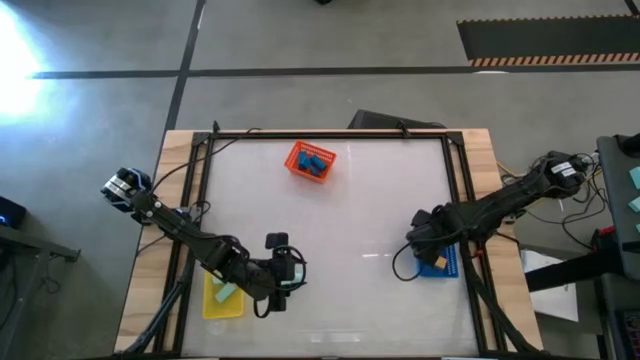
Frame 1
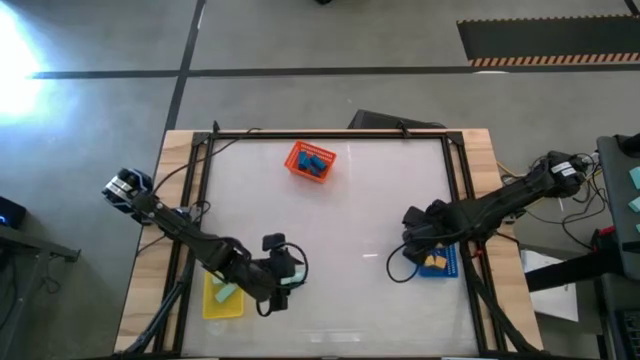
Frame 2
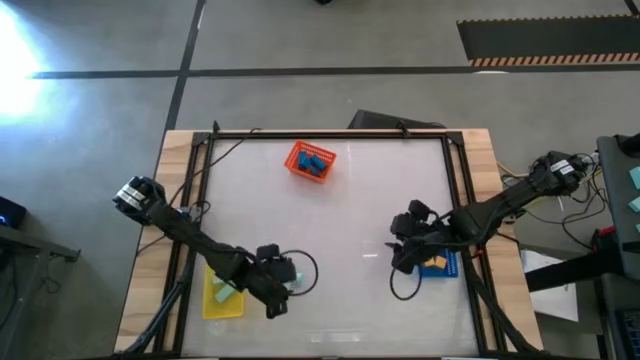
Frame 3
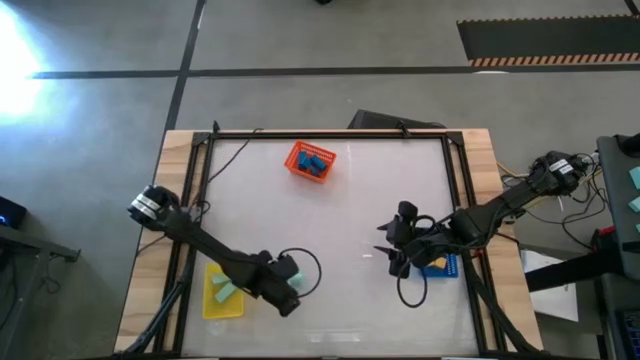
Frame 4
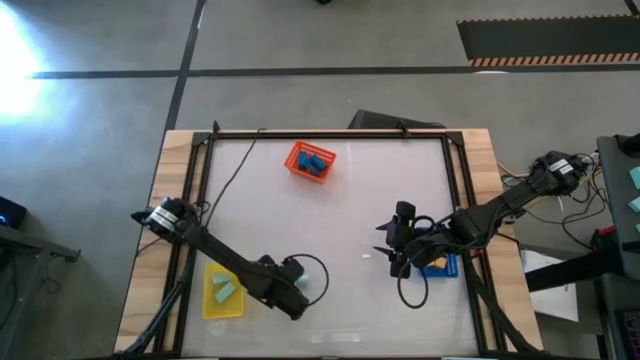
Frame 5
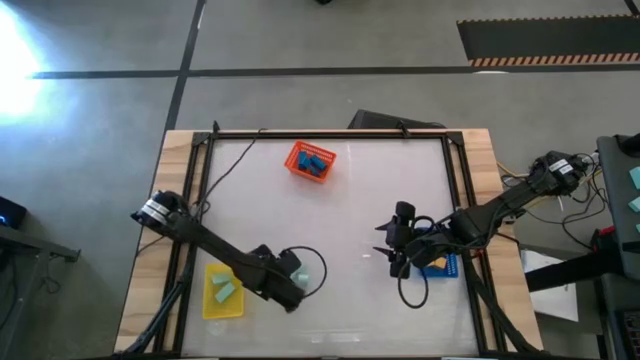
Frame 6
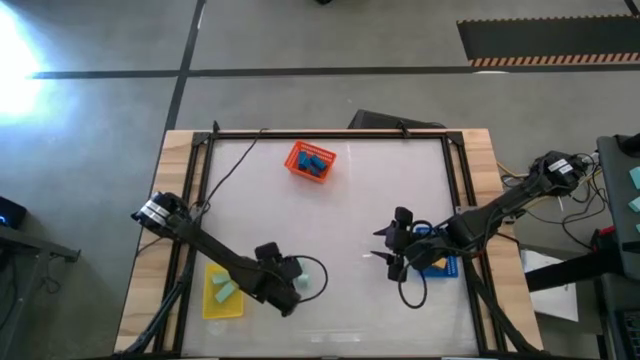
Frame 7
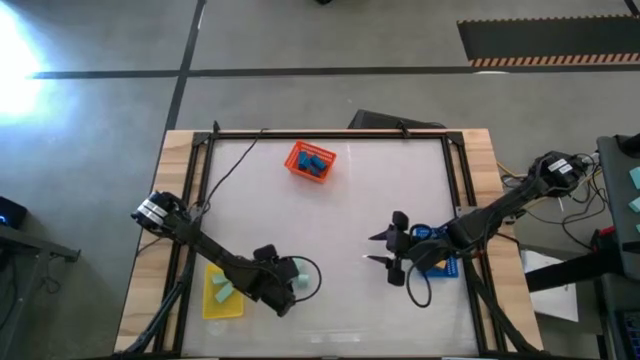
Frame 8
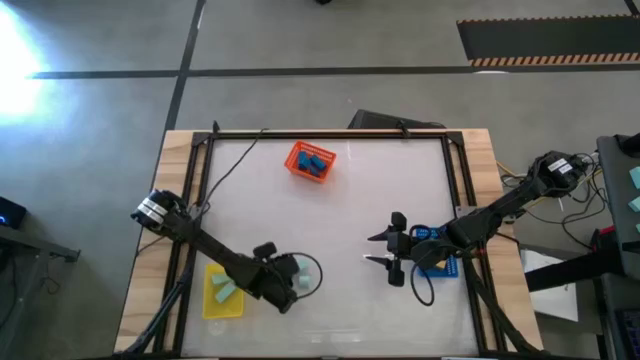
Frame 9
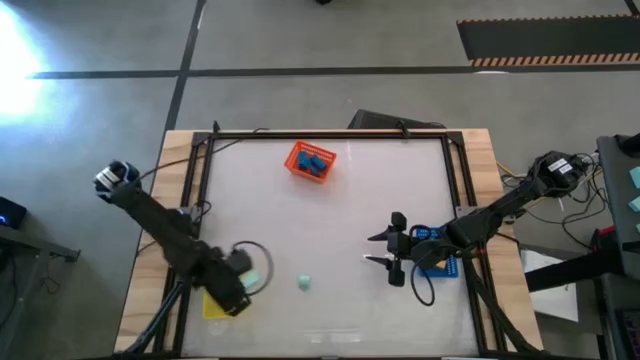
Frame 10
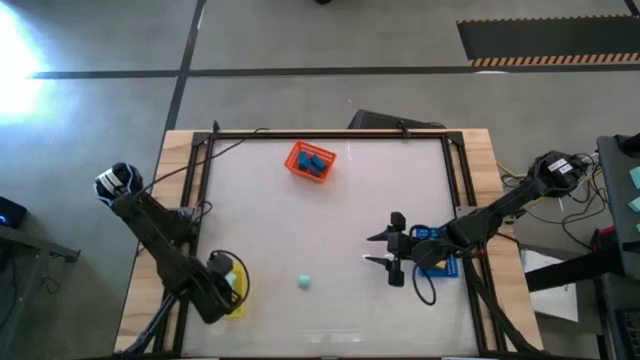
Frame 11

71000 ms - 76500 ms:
Task: Sort & place blocks by color
Put the green block into the yellow bin

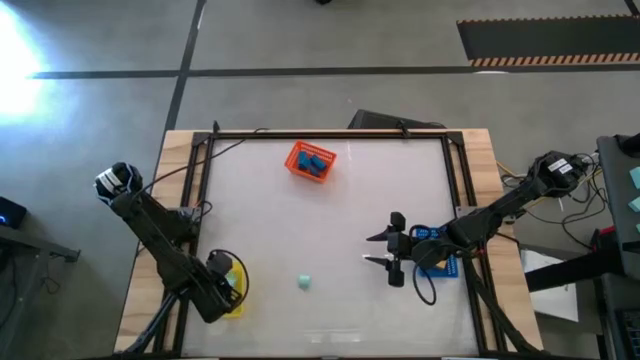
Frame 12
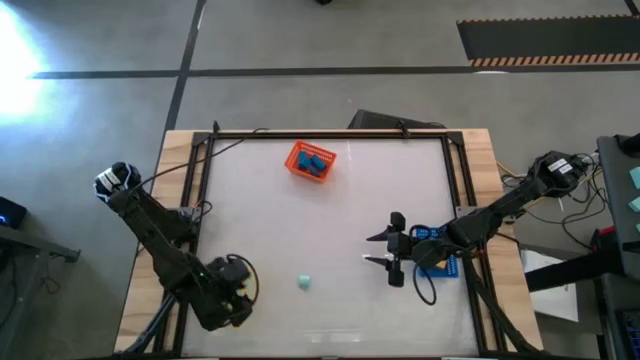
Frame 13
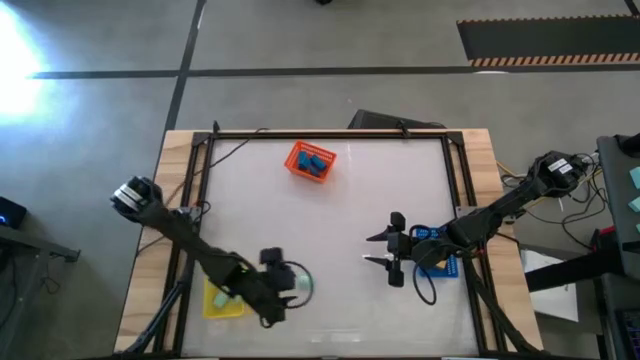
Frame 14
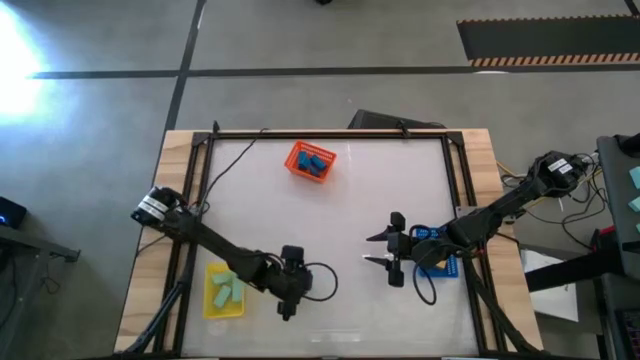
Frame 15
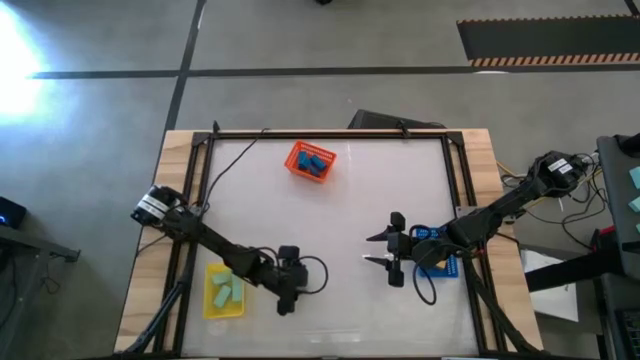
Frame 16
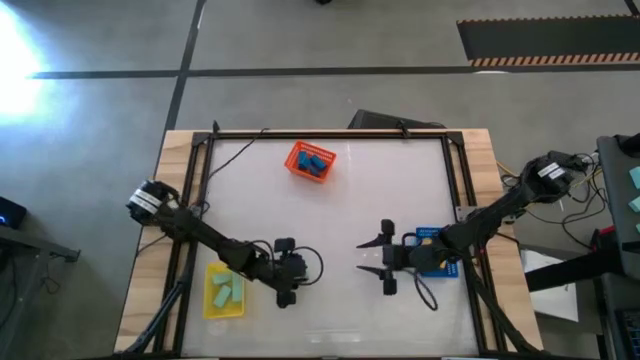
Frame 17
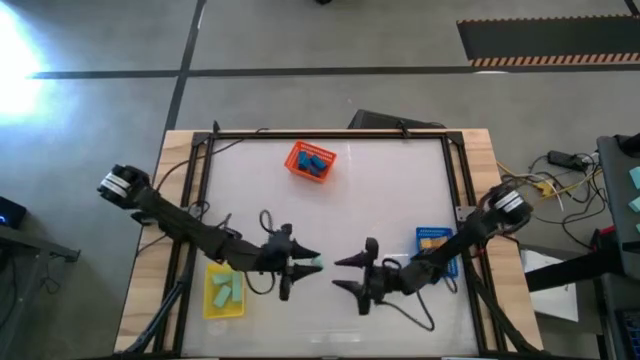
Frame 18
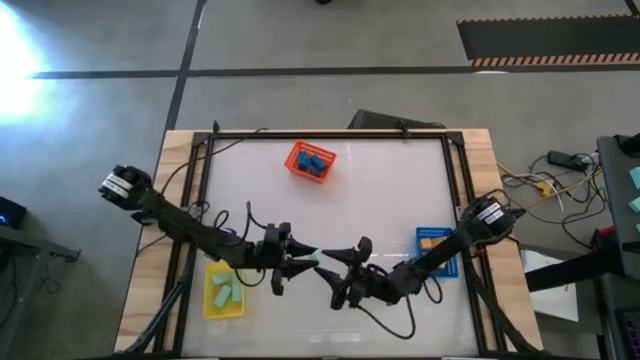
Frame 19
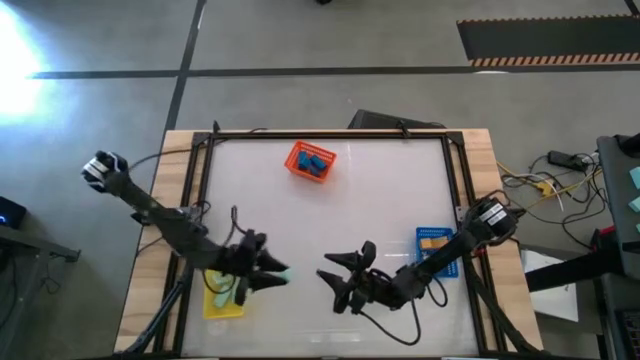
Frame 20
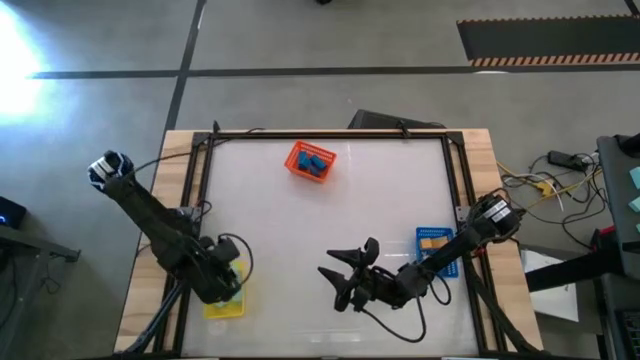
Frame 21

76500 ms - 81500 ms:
Put the green block into the yellow bin

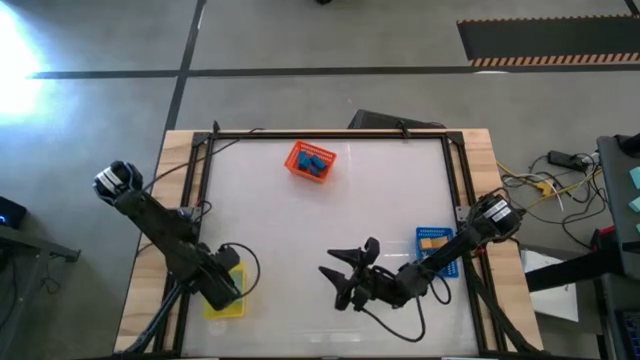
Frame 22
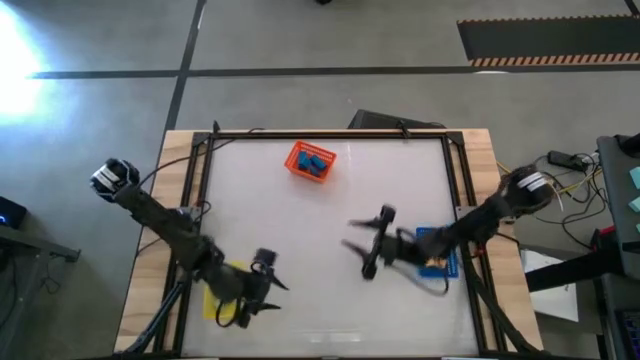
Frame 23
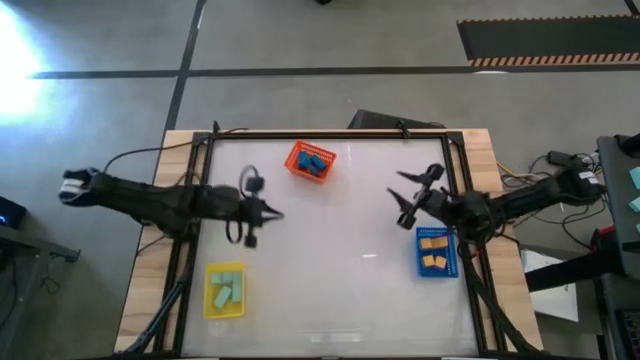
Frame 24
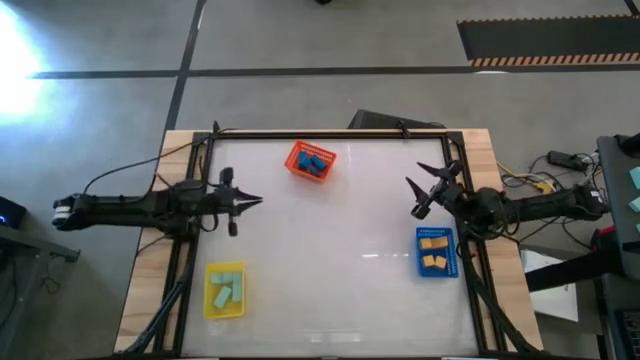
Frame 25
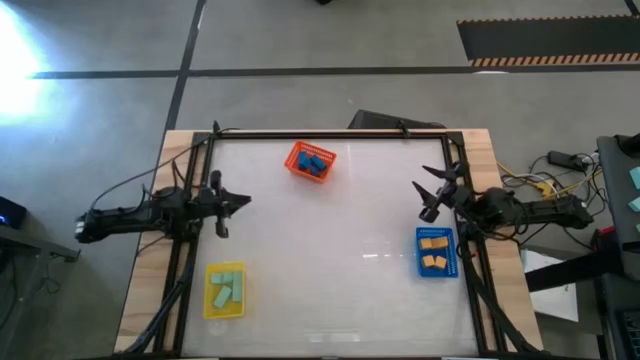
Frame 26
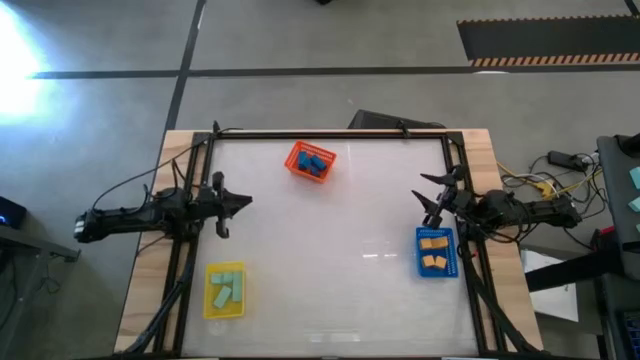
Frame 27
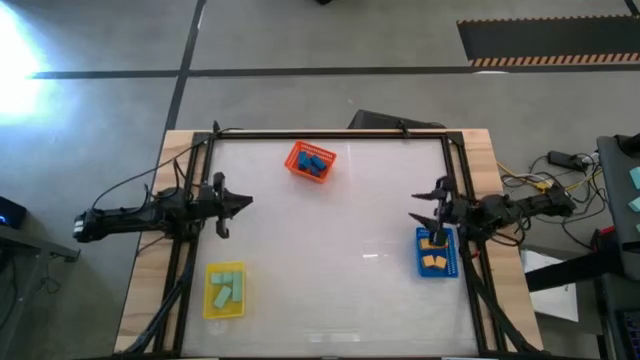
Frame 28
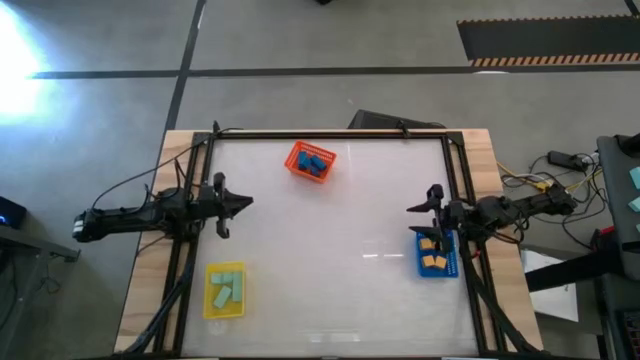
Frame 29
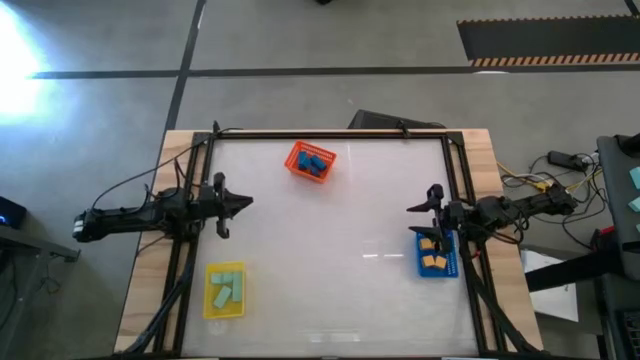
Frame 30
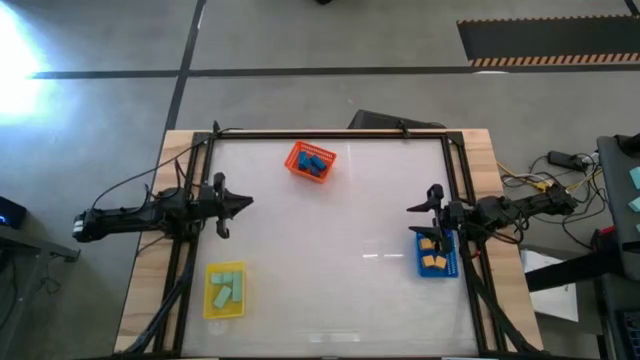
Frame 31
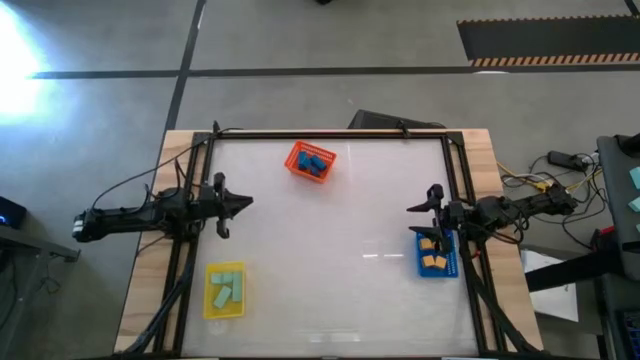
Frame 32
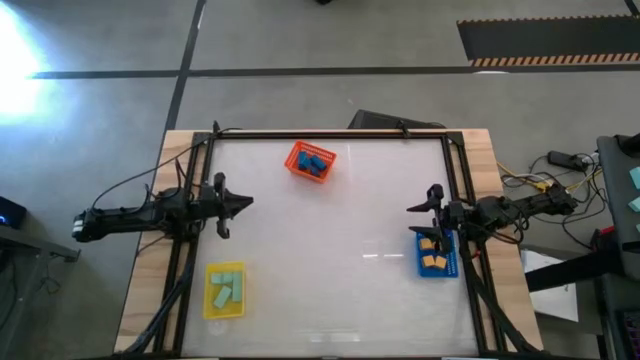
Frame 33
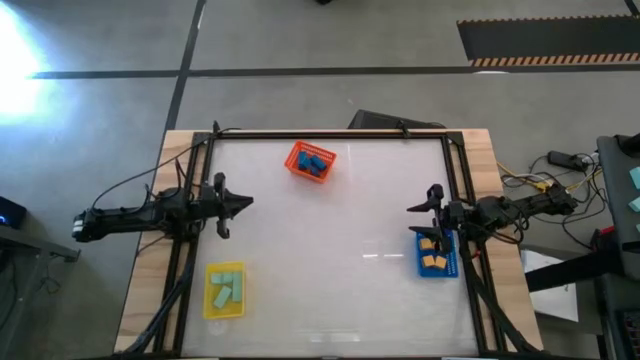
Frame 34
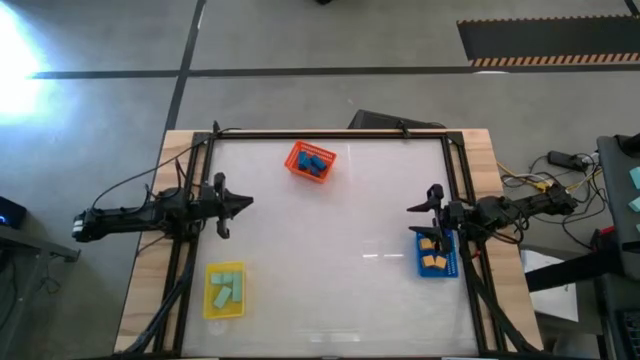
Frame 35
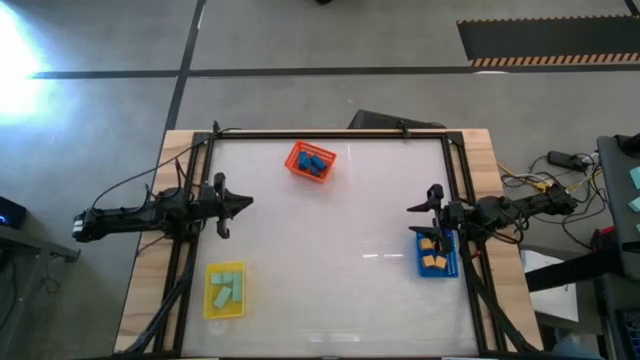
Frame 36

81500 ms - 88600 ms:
Return to Home Position

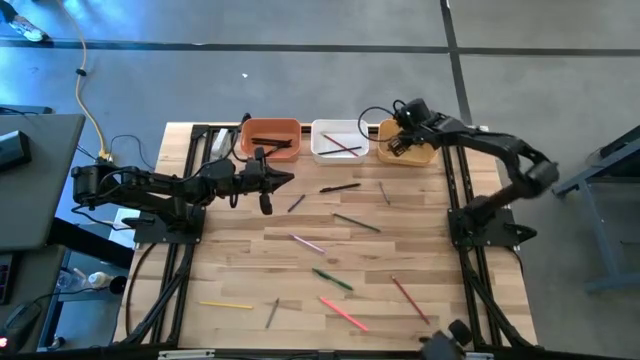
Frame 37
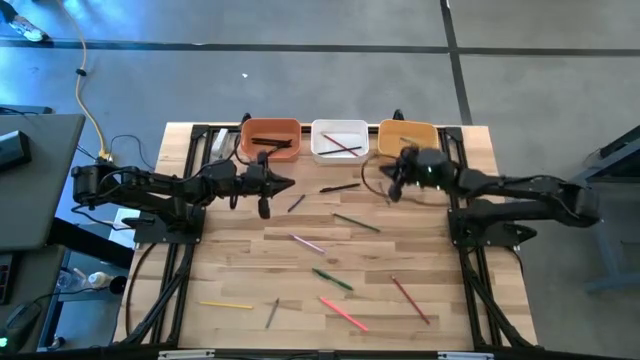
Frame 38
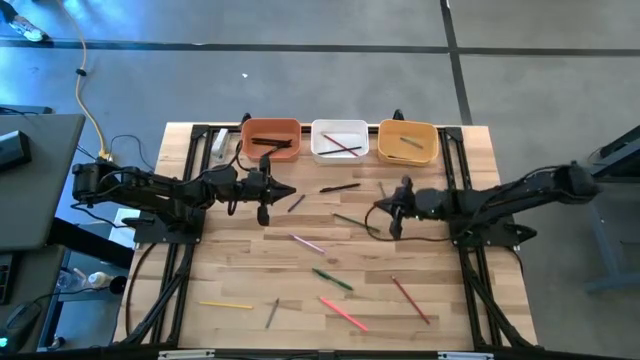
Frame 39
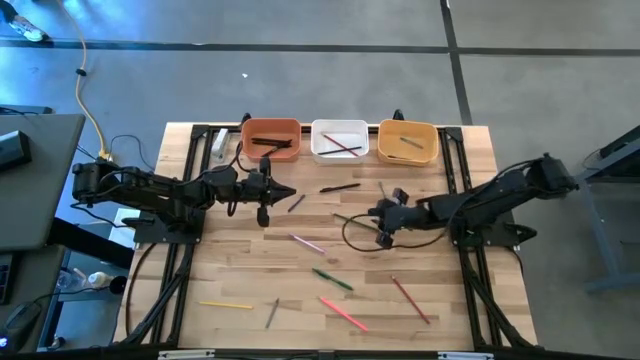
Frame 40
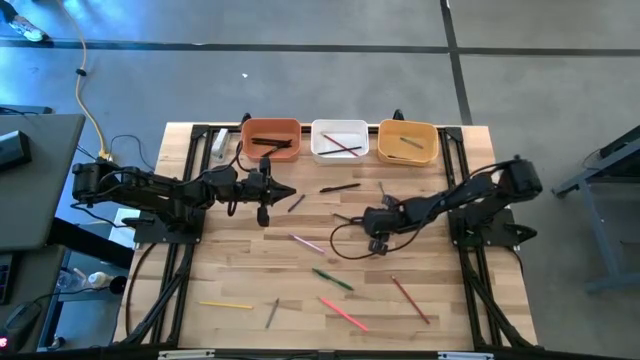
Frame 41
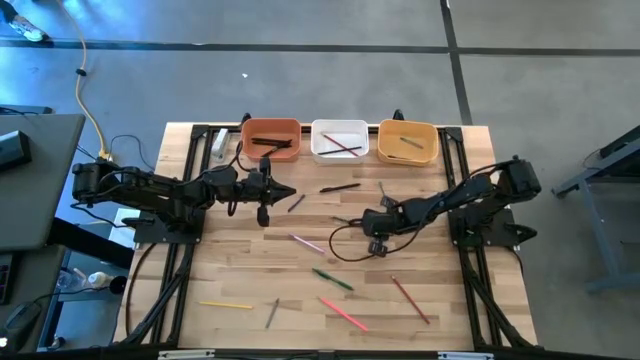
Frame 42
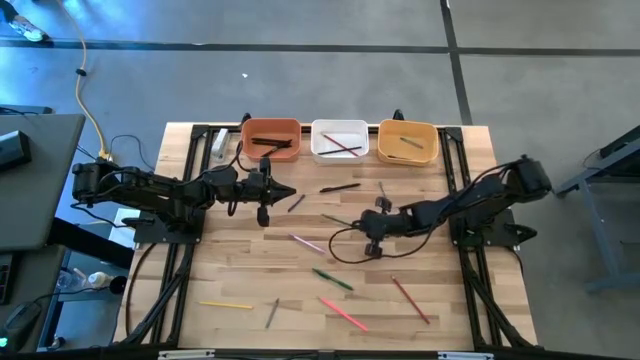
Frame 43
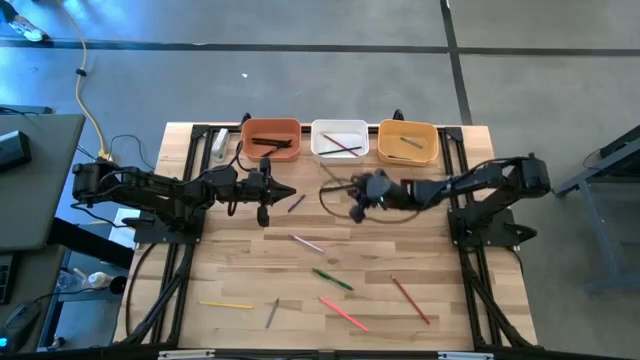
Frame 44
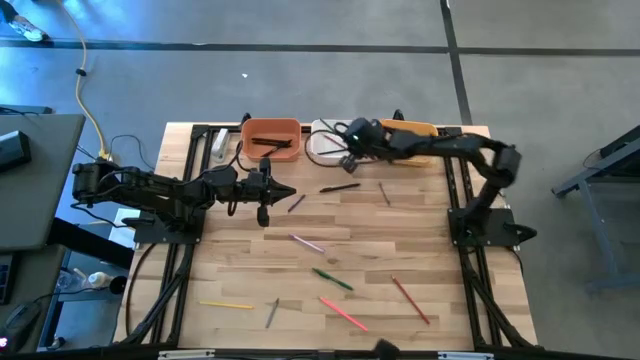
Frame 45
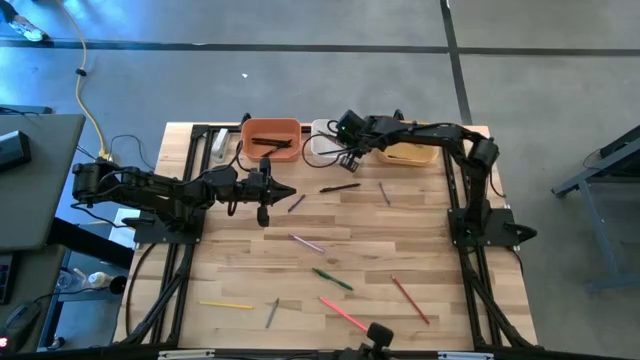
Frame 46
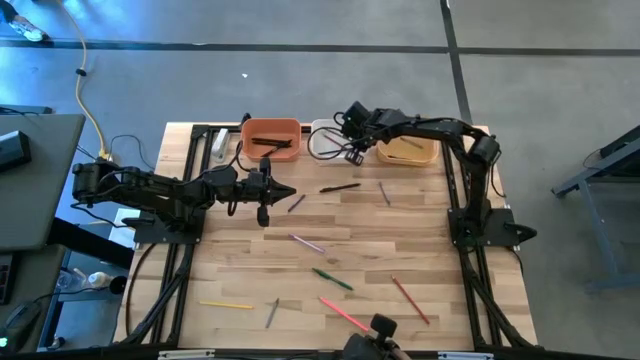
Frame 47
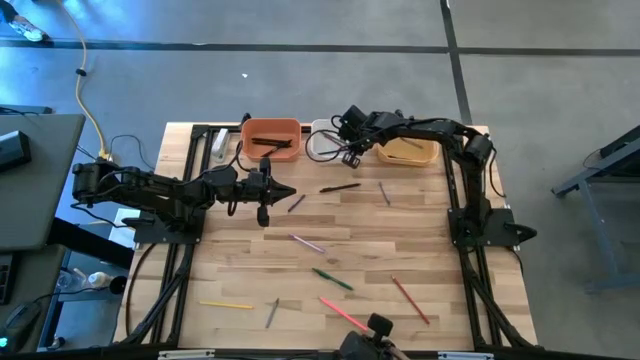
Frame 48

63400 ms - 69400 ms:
Task: Sort crayons/erasers/pens/pencils in bins
Put the green pencil into the white bin
